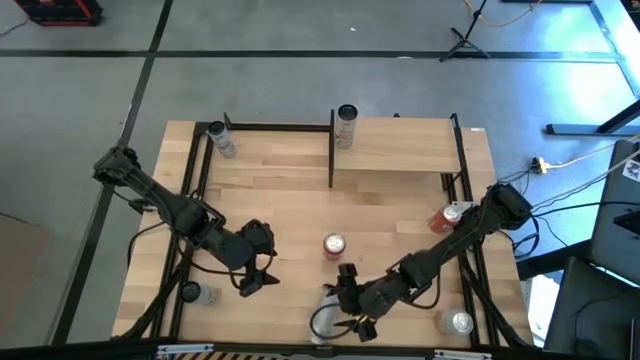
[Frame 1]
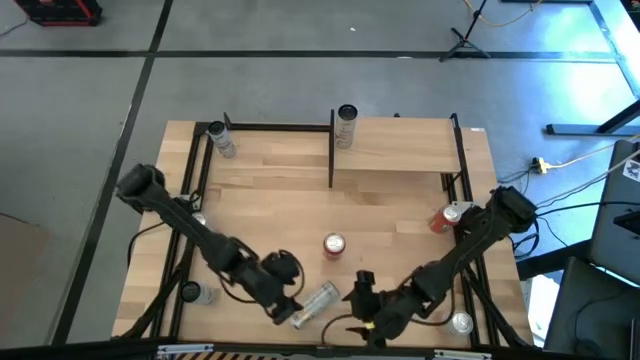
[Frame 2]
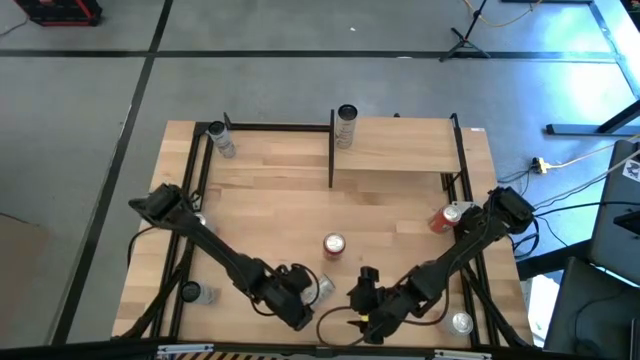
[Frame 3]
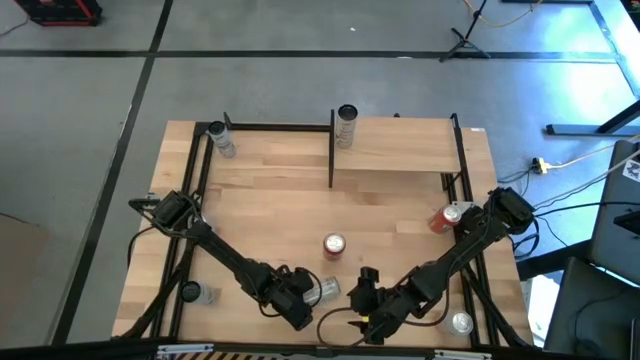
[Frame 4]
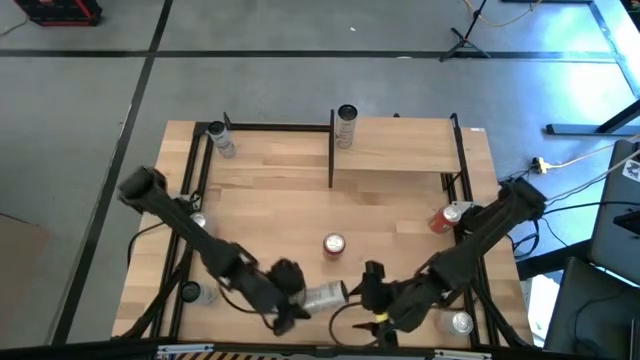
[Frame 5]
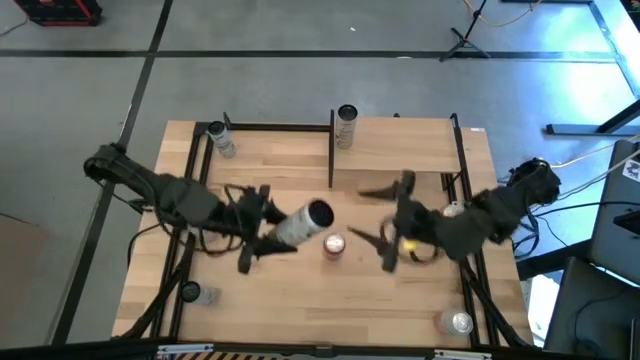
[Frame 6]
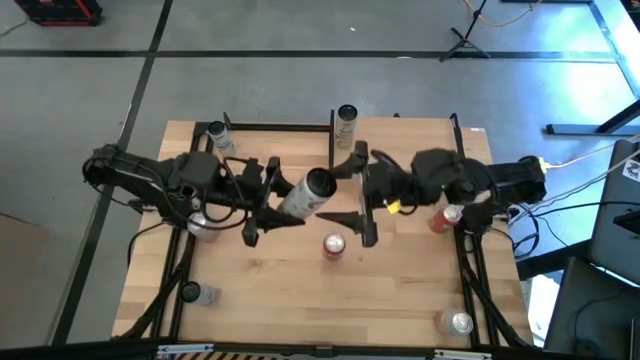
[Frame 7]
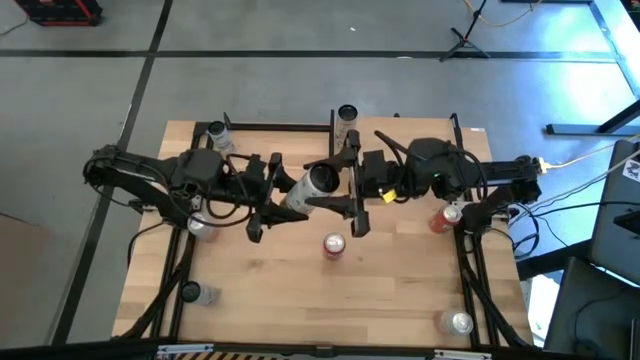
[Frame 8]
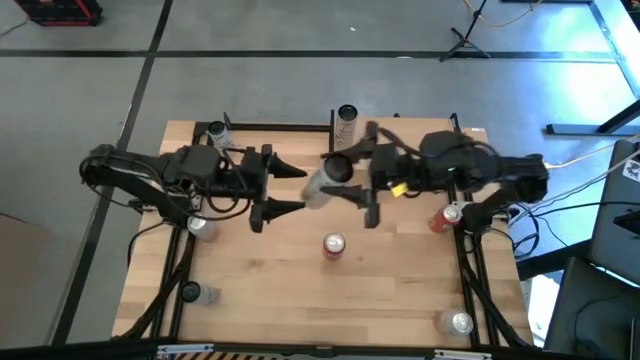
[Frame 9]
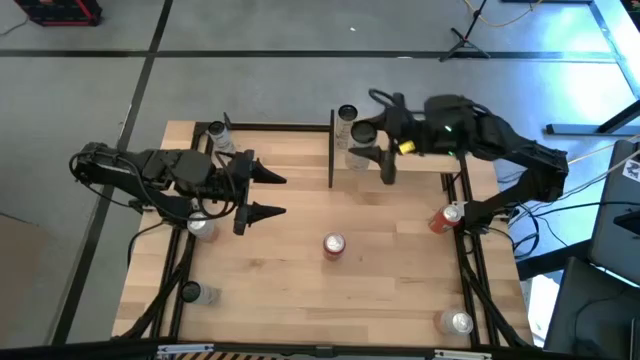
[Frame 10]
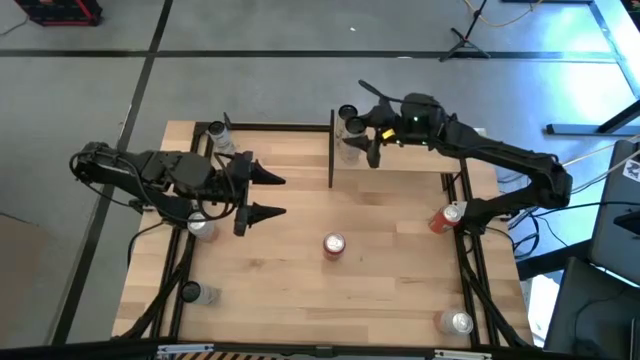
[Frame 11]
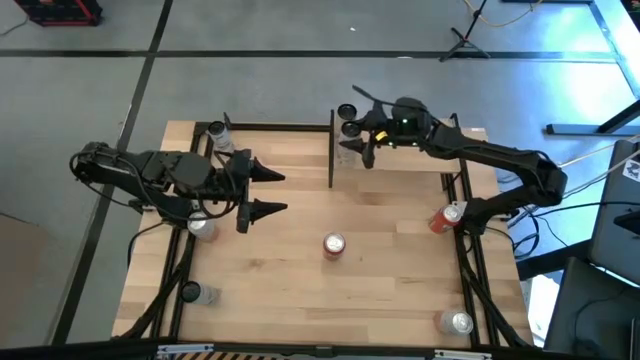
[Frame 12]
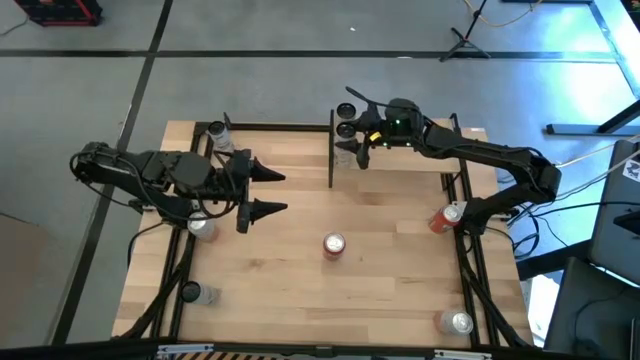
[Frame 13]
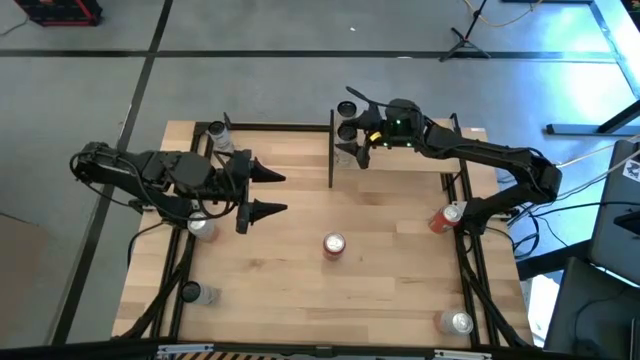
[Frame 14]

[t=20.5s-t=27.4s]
Task: Place canned beverage on shelf
Put the white yellow soda can on the shelf aligned with the other white yellow soda can

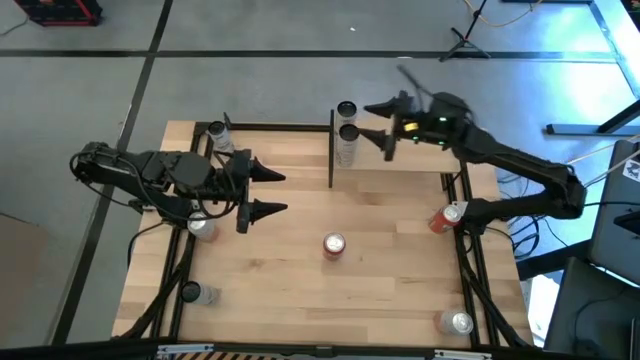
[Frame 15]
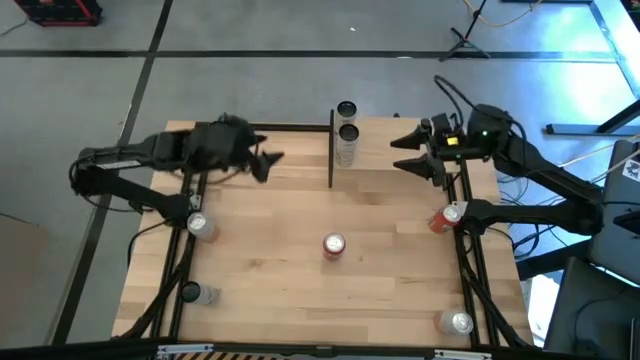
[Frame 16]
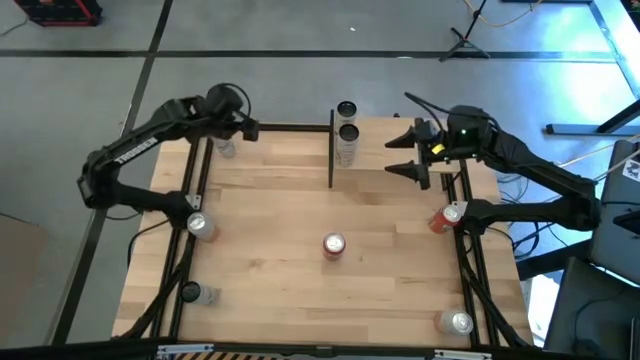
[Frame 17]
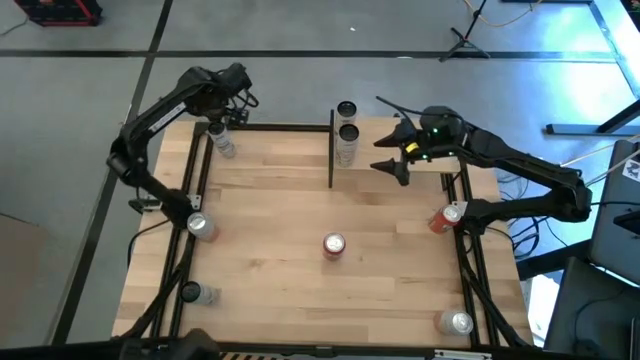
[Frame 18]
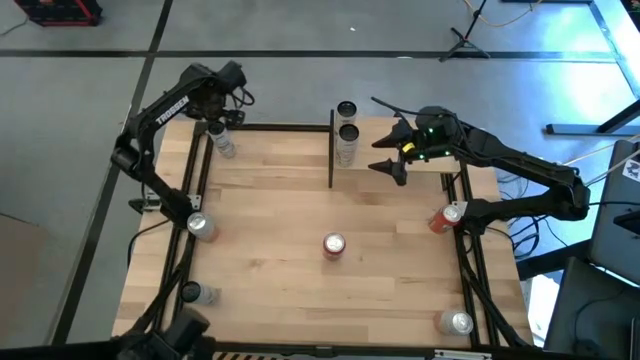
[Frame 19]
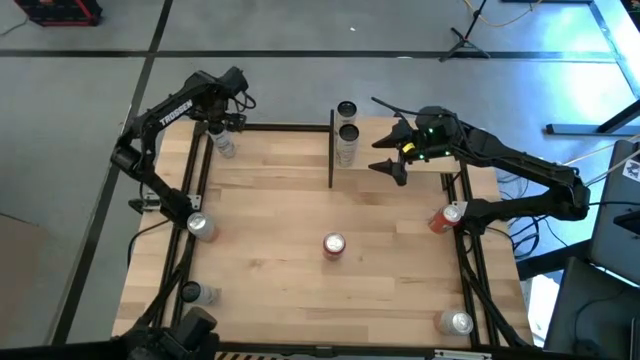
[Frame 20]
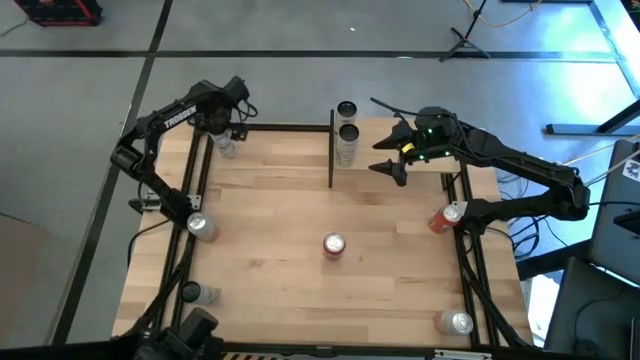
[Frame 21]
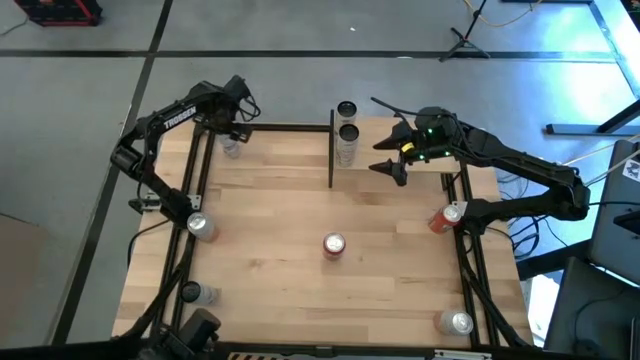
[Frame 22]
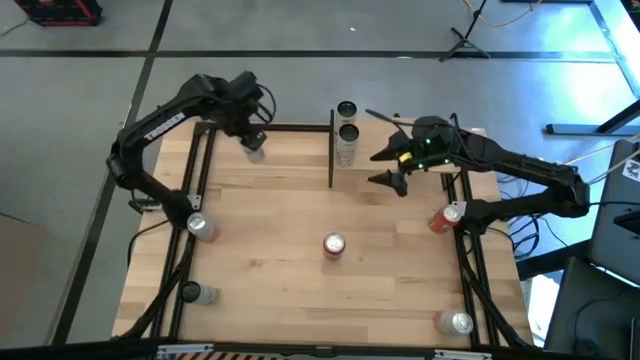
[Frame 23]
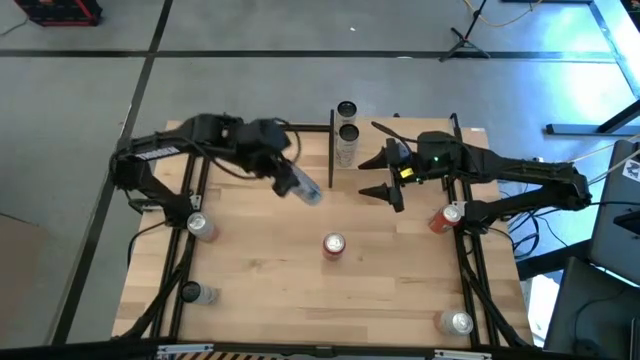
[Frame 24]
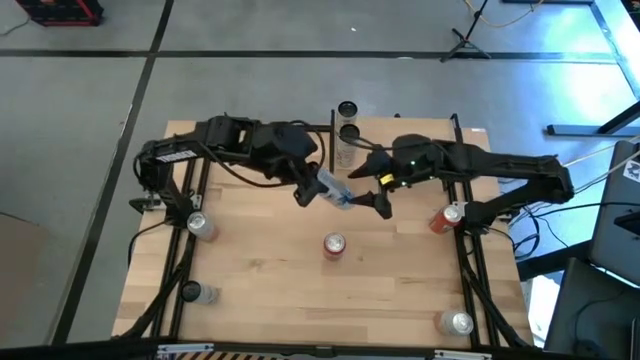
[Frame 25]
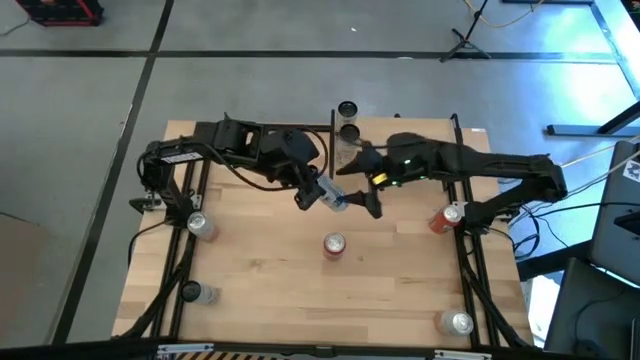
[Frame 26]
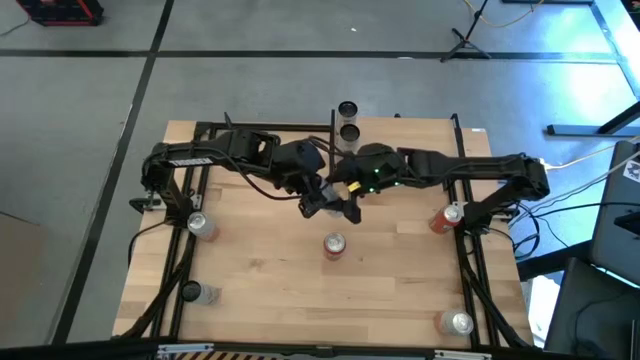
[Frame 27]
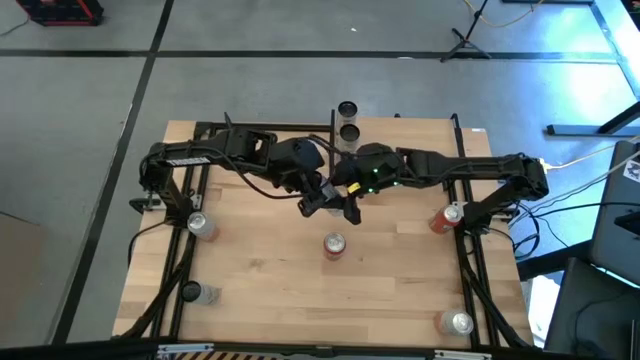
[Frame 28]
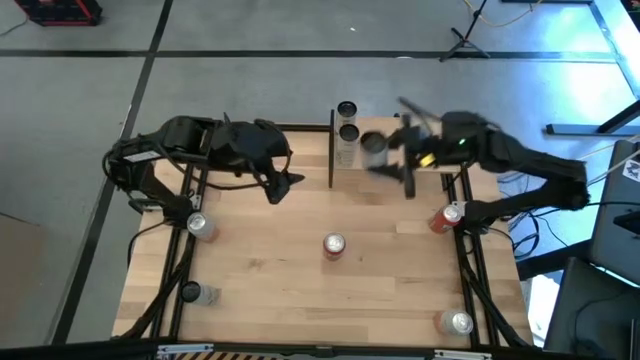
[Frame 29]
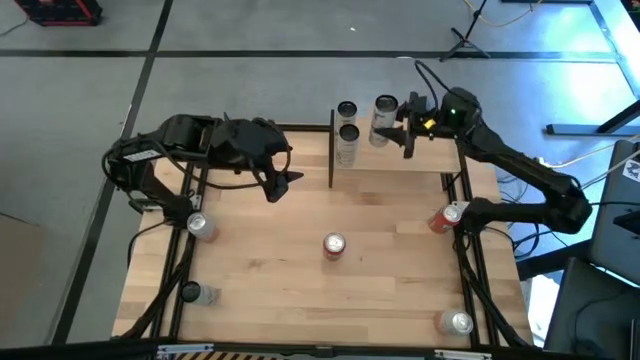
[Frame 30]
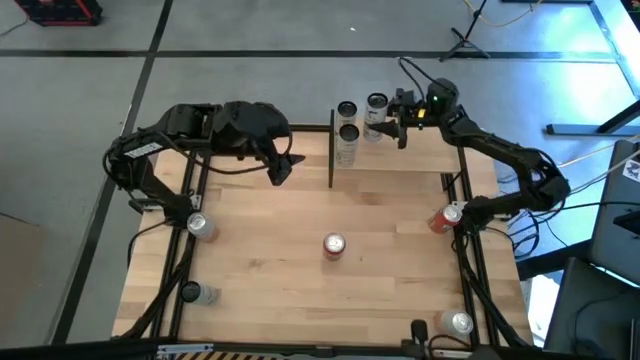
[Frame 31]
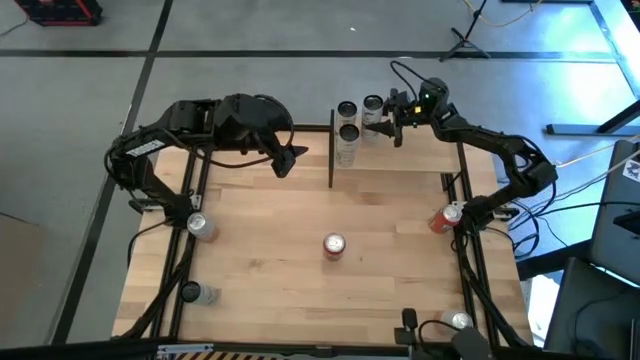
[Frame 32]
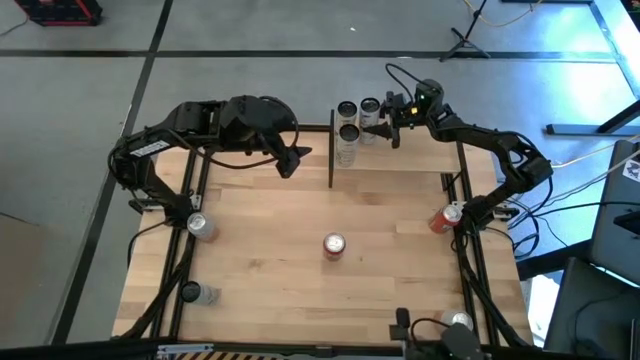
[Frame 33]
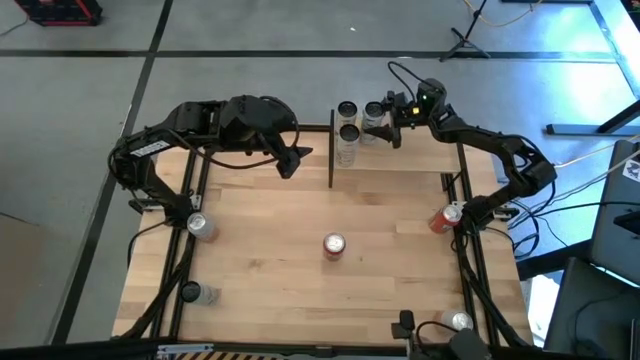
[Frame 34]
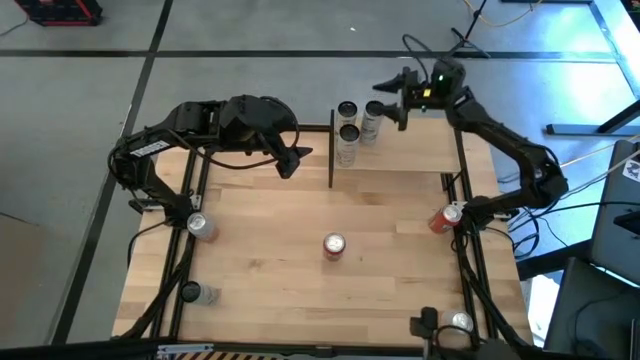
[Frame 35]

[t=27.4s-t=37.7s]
Put the top white blue soda can on the shelf

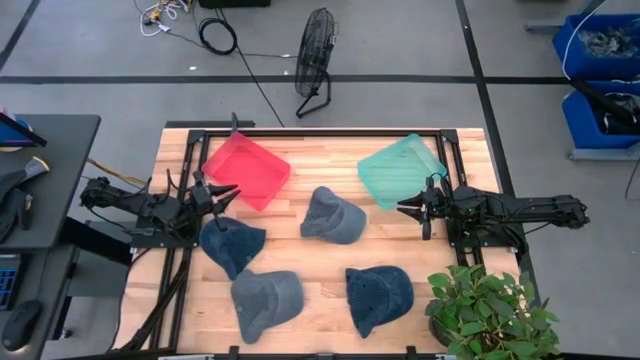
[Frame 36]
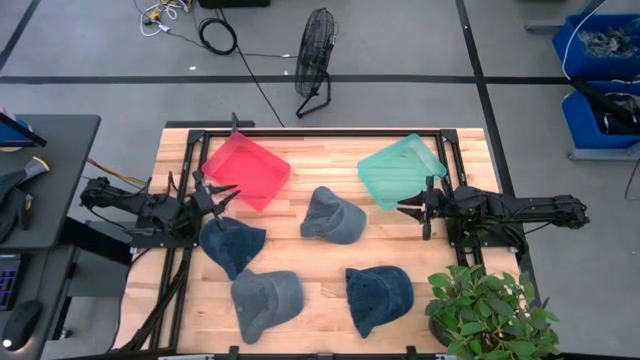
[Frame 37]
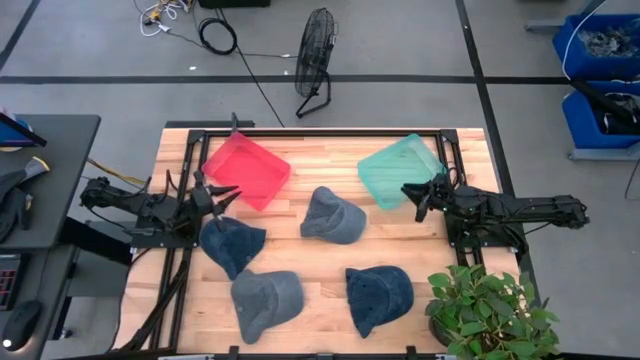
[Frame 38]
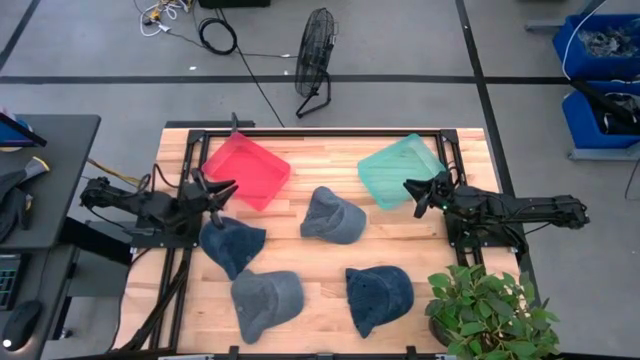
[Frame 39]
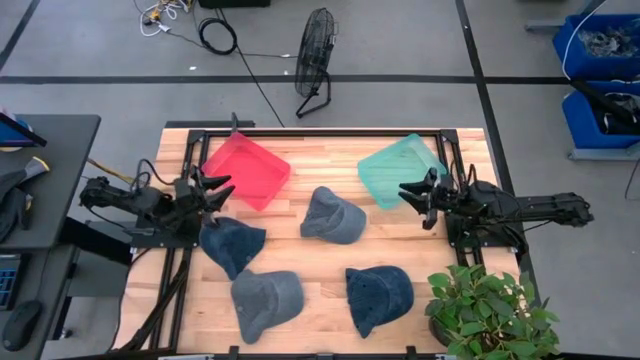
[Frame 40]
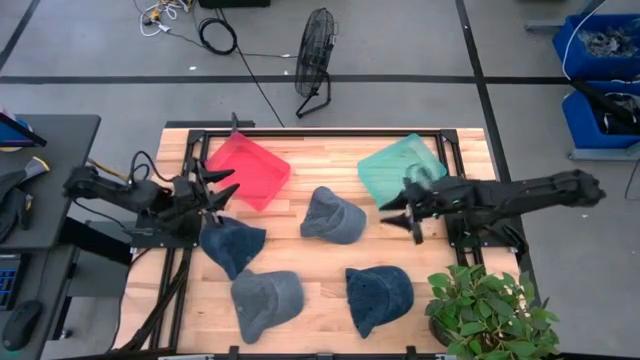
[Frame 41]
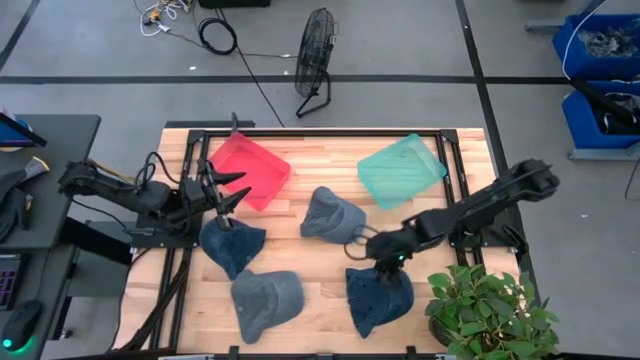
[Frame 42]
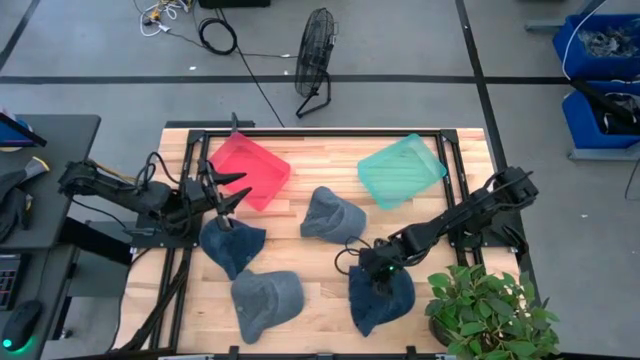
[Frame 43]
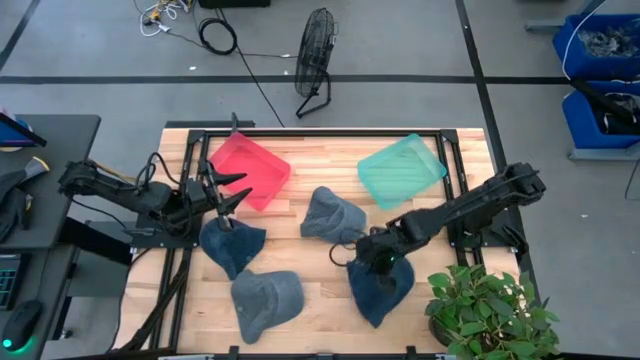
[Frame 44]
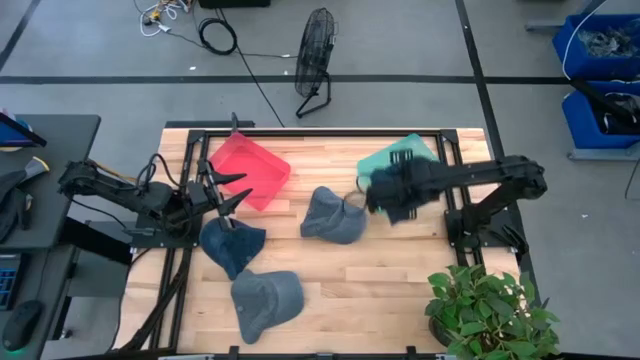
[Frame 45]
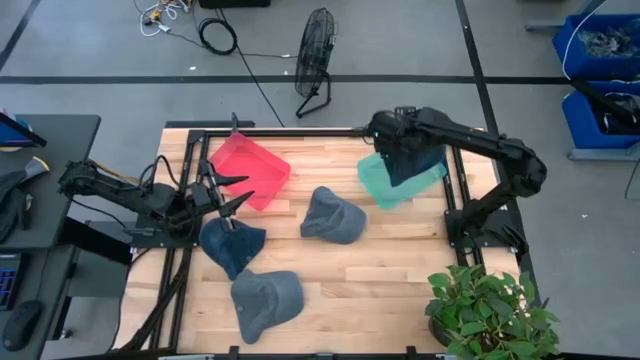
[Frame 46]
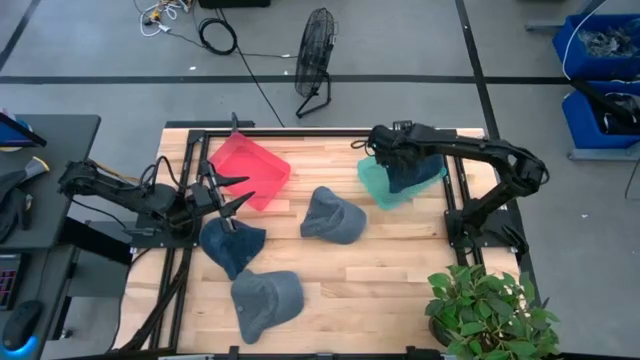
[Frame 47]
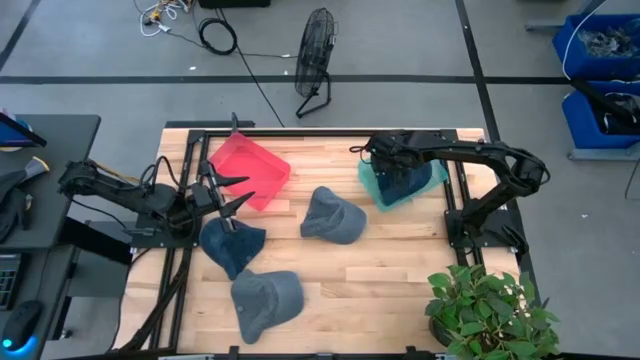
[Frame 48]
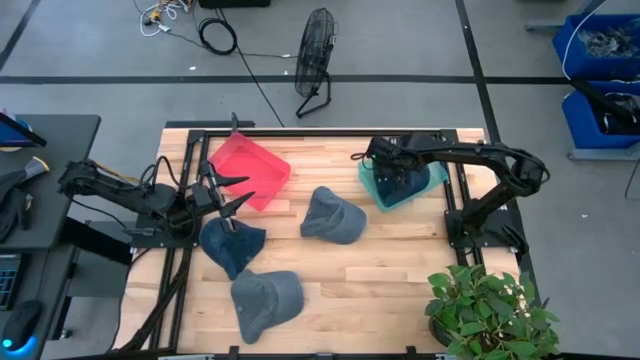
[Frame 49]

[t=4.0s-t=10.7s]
Task: Pick & Place hat
Put the bottom blue cap into the green bin
